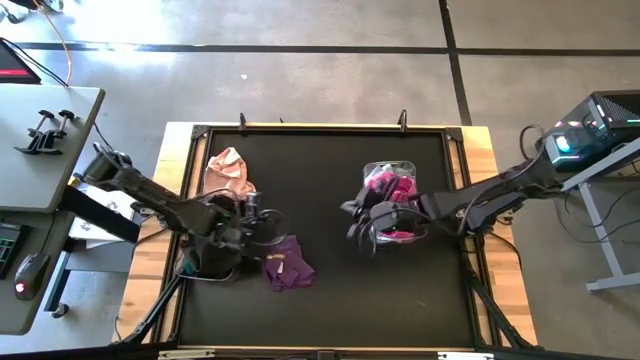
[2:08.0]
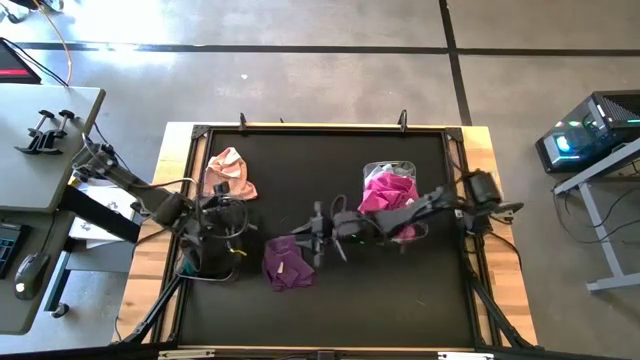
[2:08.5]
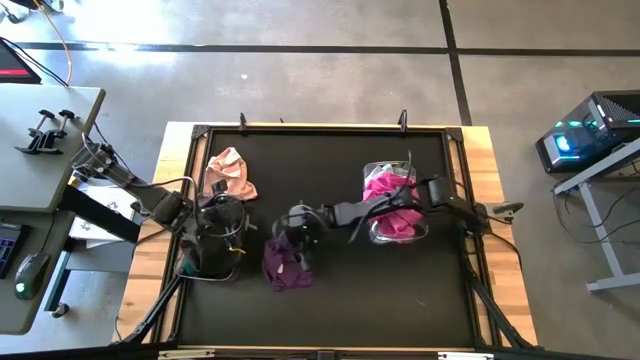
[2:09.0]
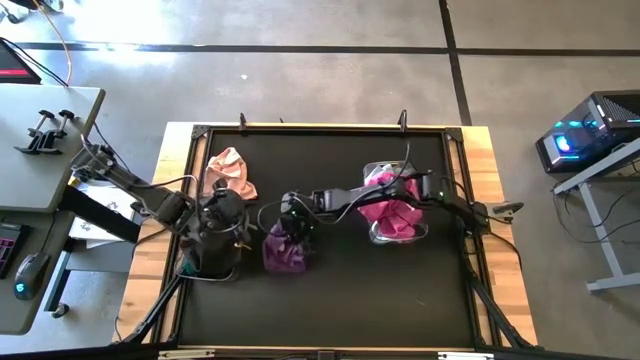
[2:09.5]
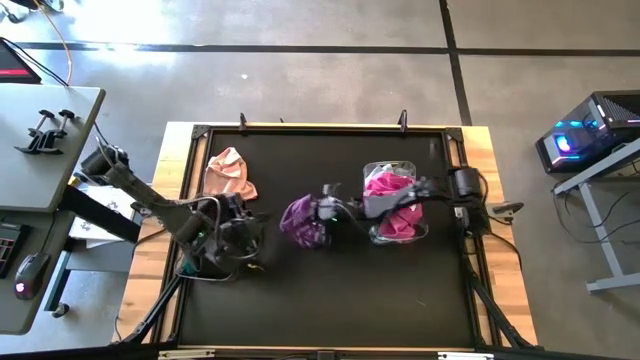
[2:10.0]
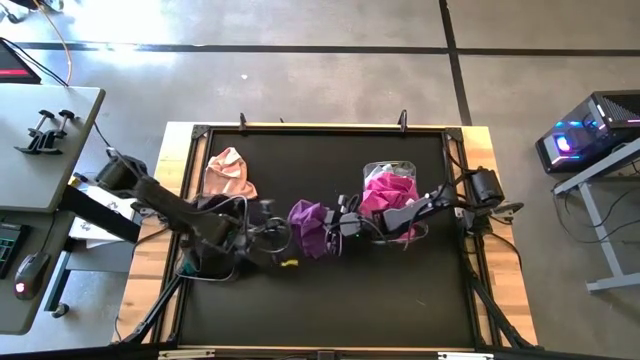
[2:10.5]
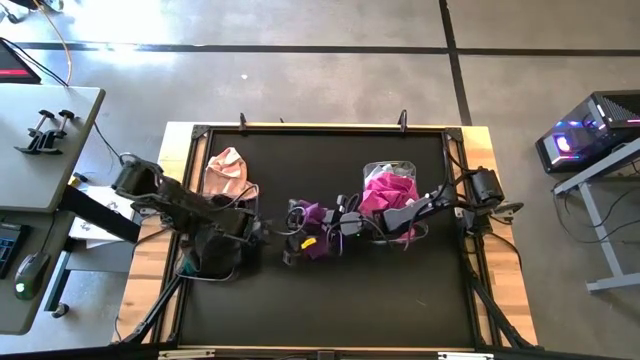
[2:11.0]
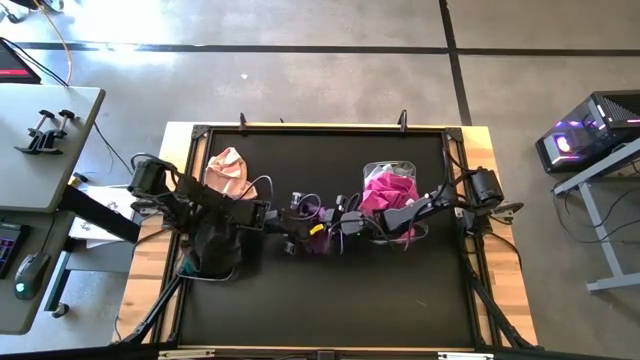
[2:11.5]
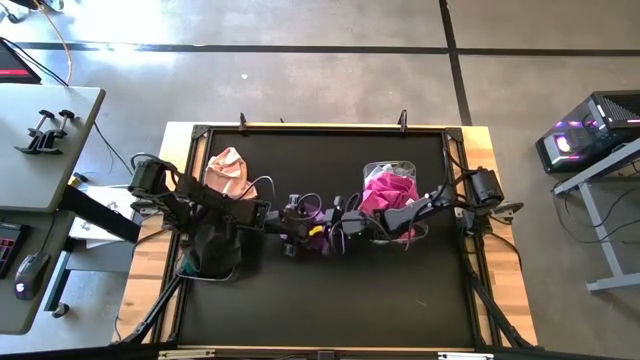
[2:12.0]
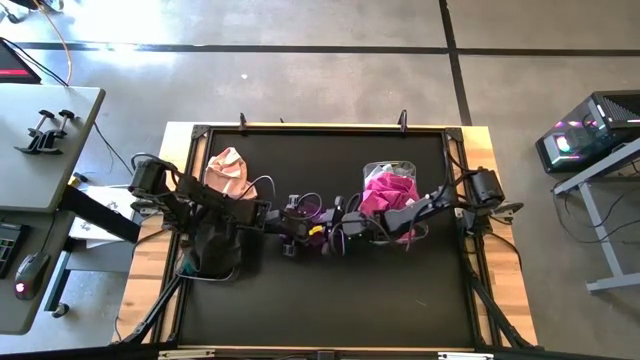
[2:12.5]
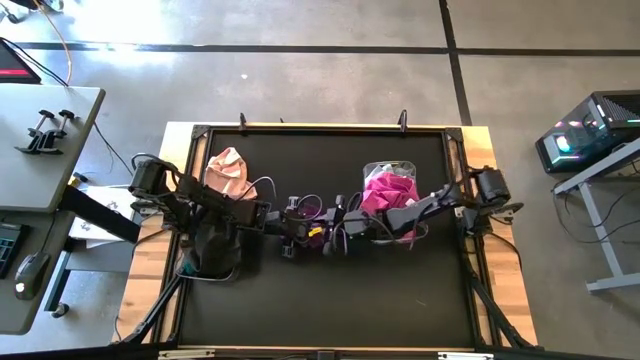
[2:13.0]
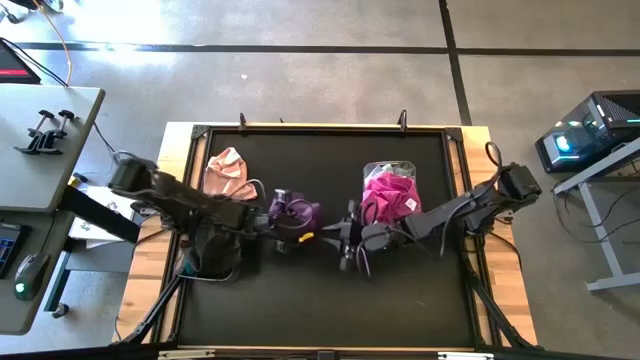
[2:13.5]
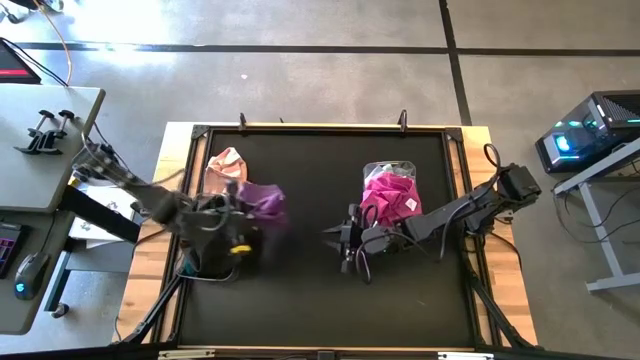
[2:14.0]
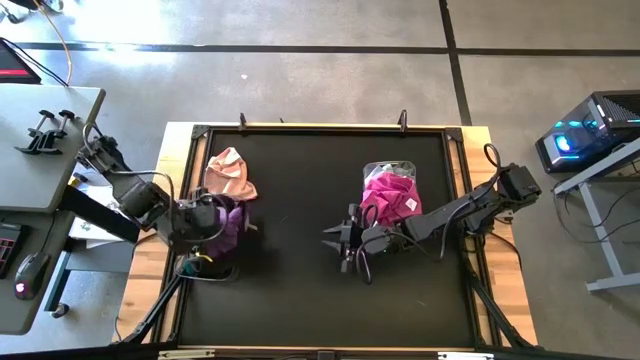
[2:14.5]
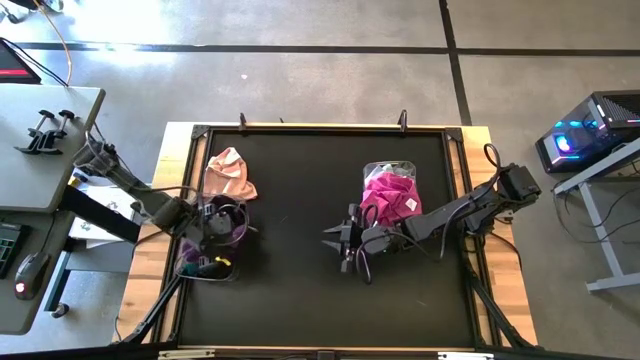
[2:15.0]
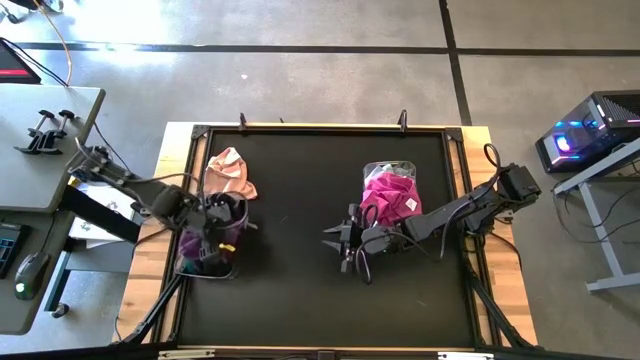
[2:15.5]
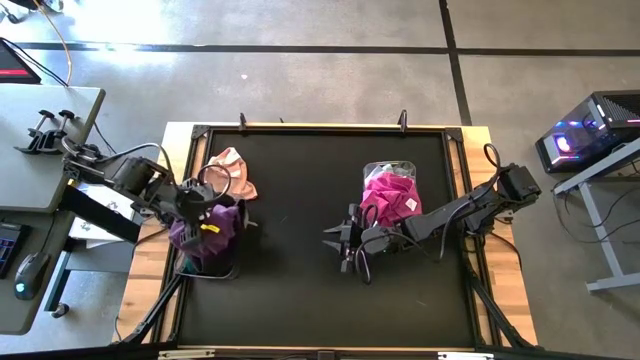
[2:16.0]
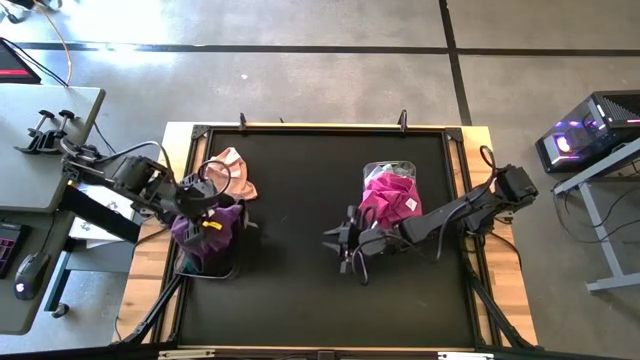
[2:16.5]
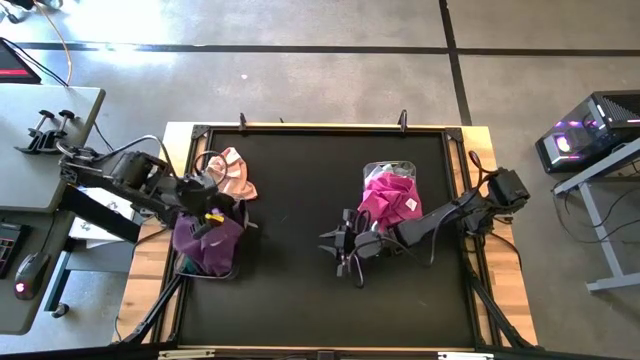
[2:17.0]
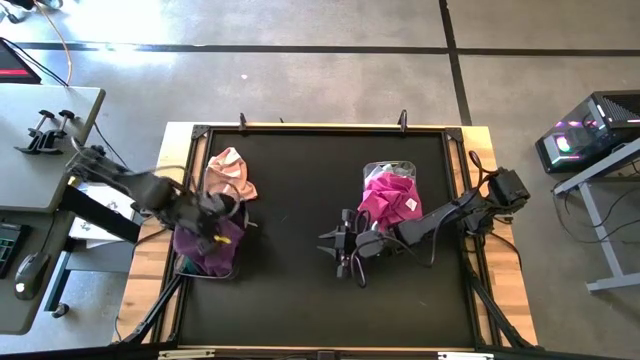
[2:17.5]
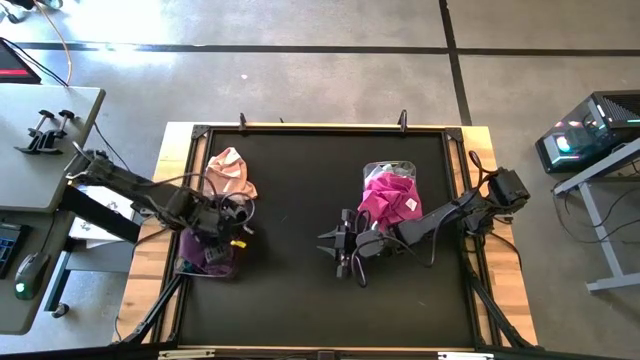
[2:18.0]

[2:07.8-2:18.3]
Task: Sort towels by color in basket
Put the violet towel into the left transparent bin

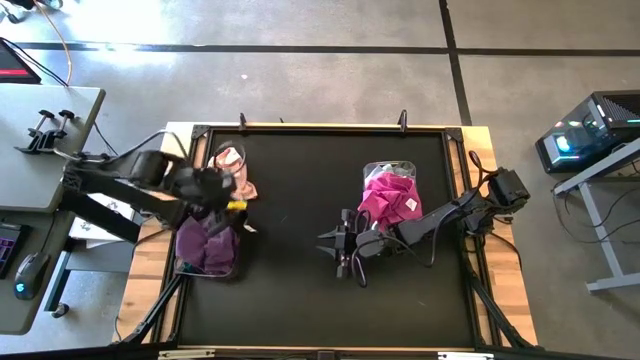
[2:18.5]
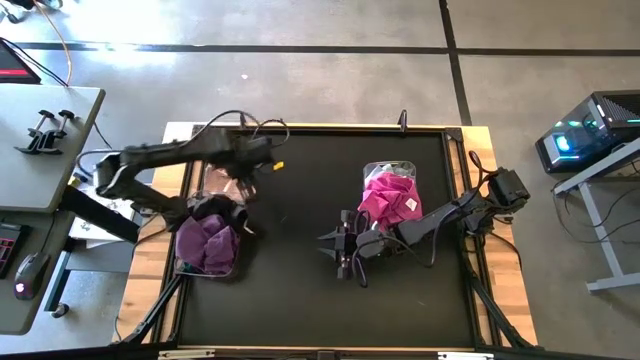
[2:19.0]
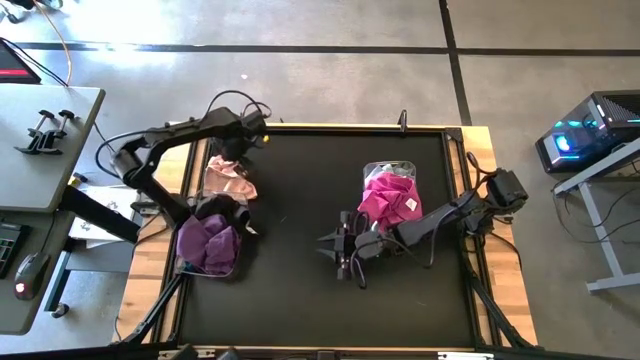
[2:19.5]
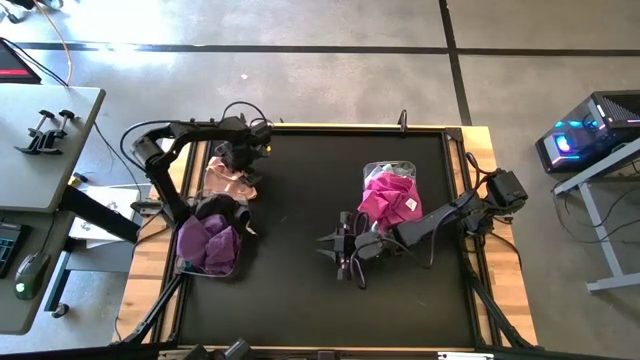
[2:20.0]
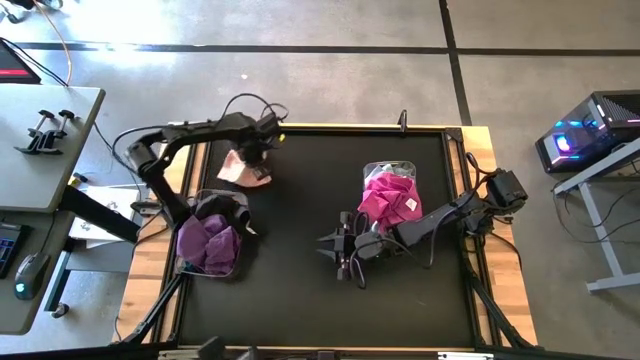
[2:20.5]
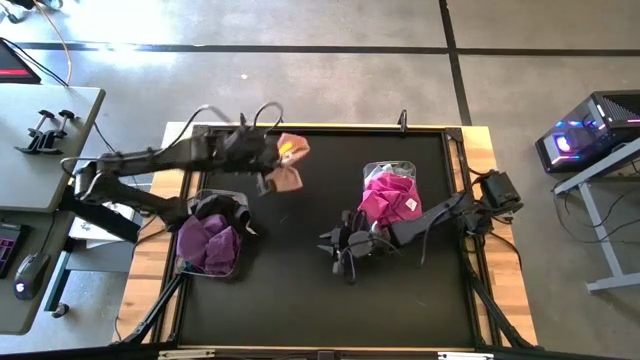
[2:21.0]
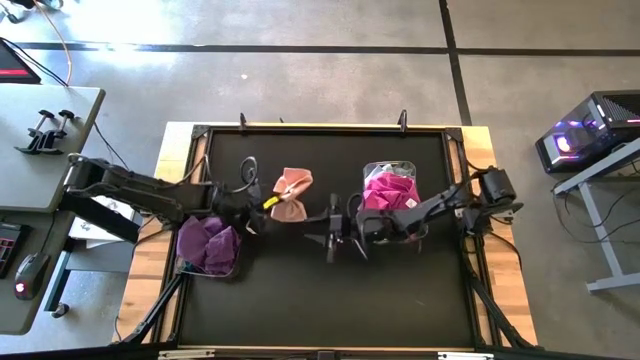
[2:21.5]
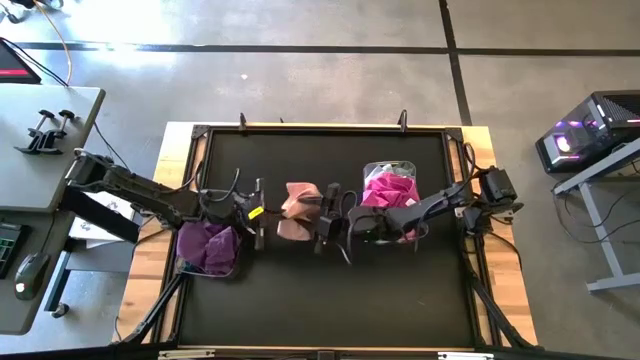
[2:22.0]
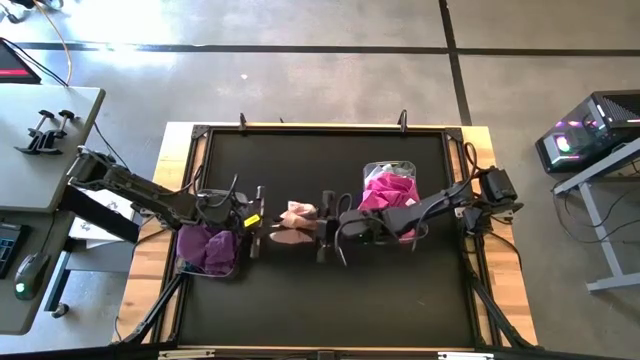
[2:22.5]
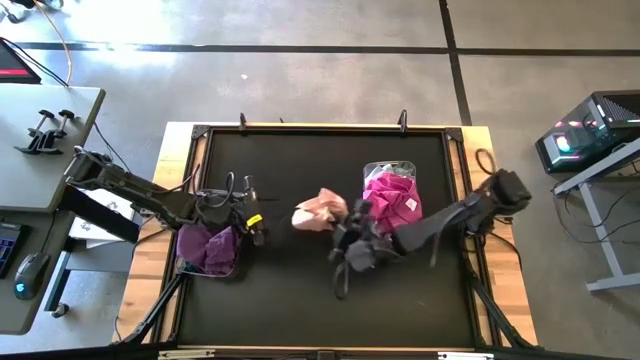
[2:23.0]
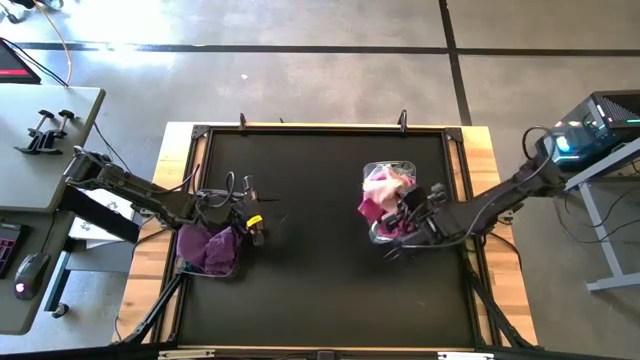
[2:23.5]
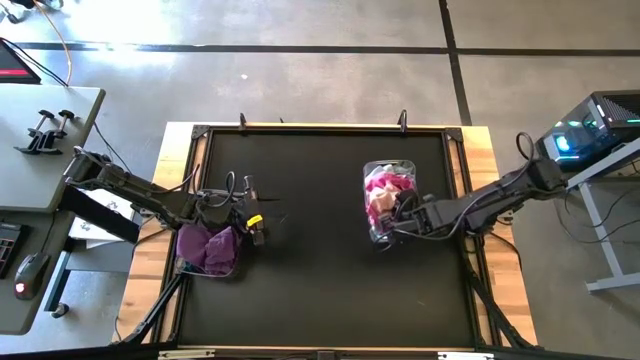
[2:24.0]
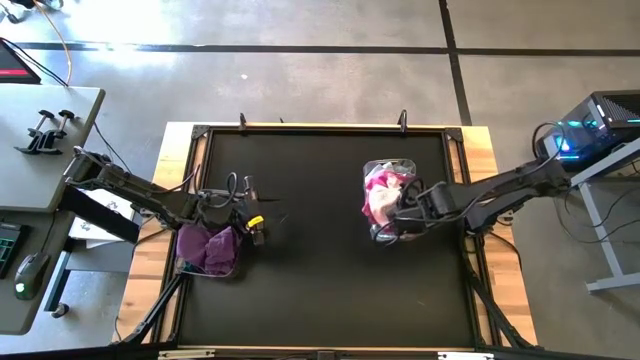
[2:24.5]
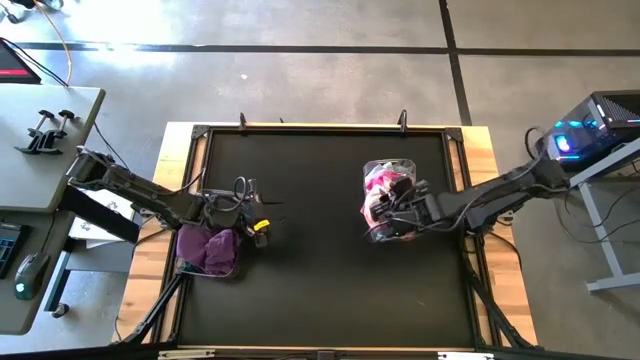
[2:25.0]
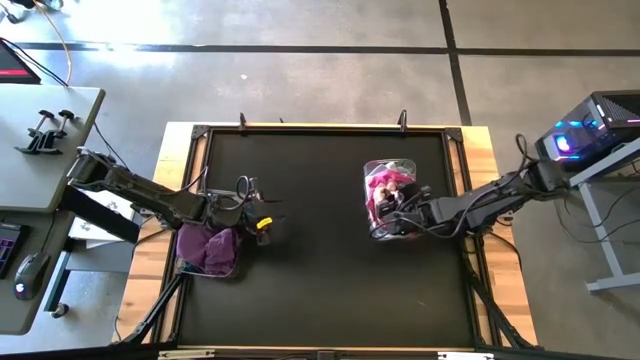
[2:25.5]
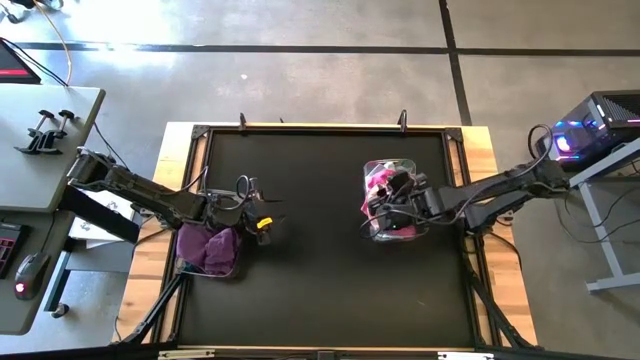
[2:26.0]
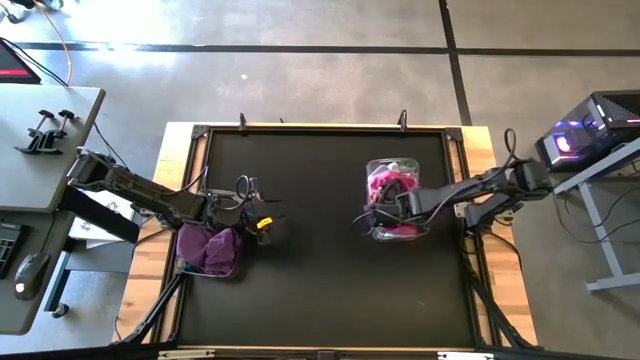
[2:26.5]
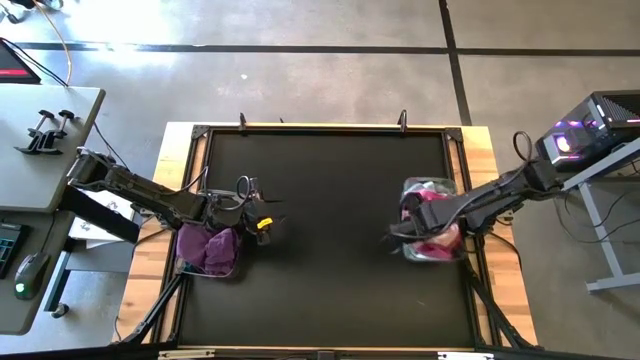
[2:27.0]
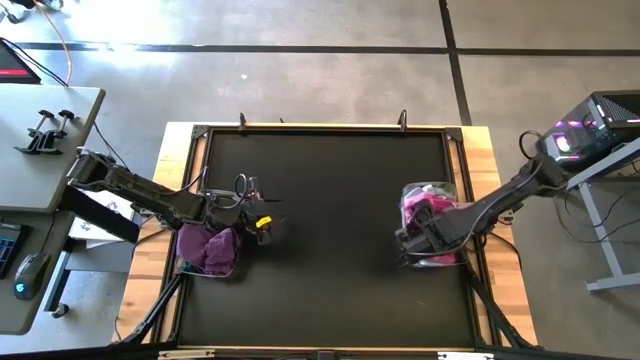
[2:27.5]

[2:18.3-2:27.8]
Put the light orange towel into the right transparent bin

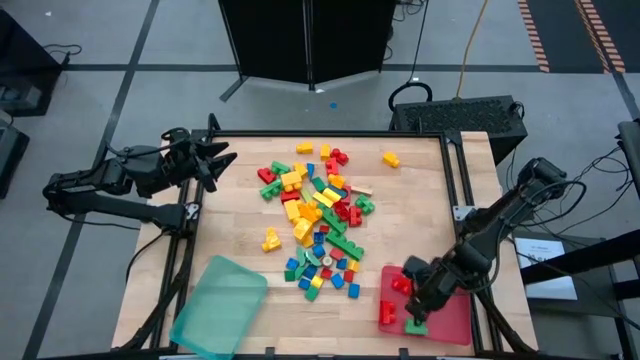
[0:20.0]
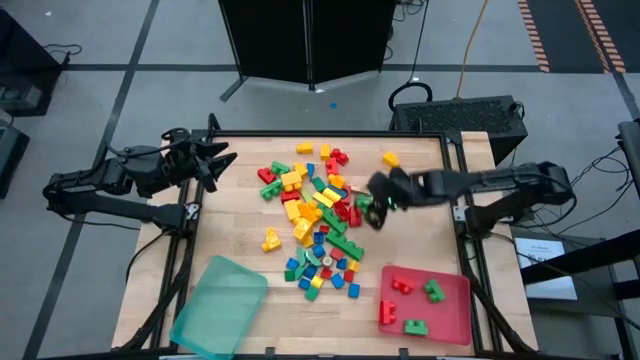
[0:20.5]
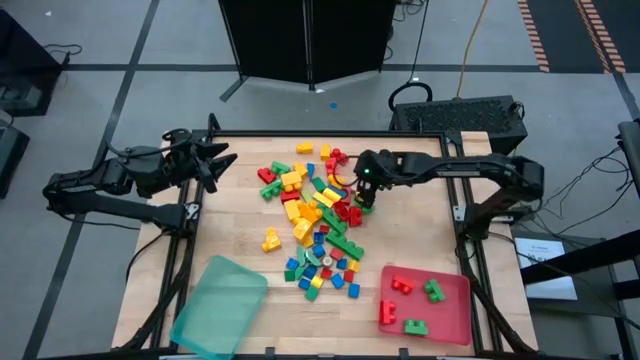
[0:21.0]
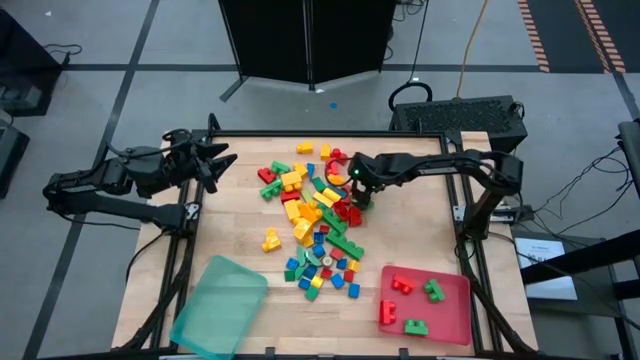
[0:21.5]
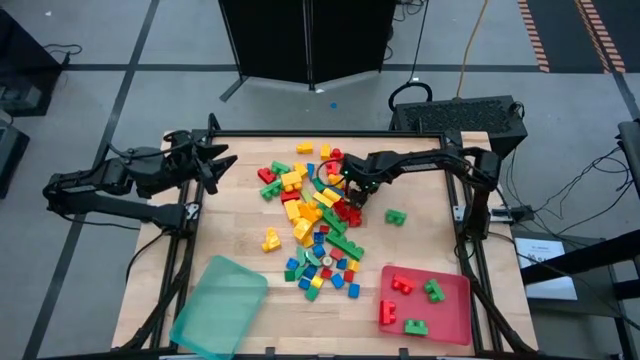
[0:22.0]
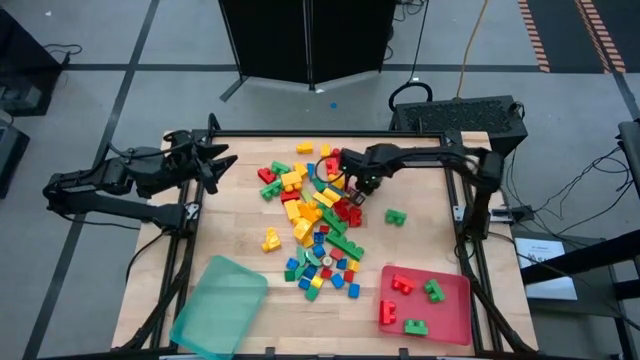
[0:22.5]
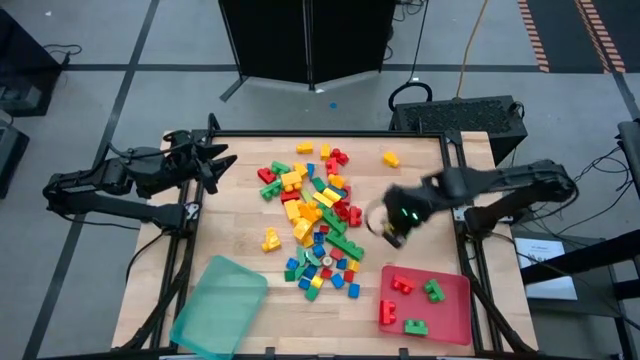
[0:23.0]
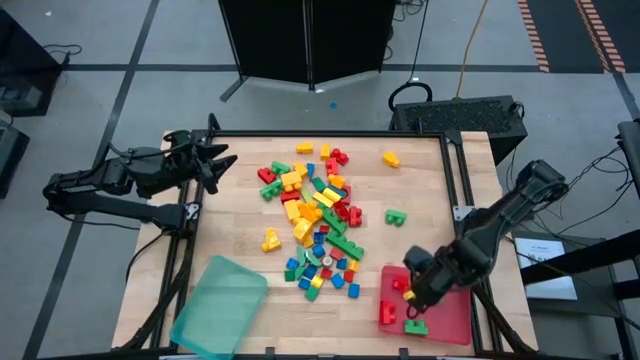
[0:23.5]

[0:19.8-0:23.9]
Task: Sort blocks by size
Put the wooden block into the pink bin
